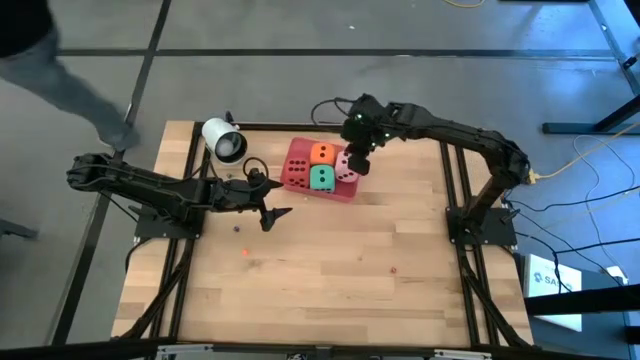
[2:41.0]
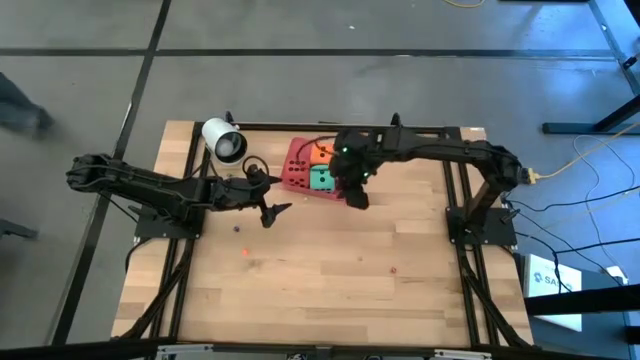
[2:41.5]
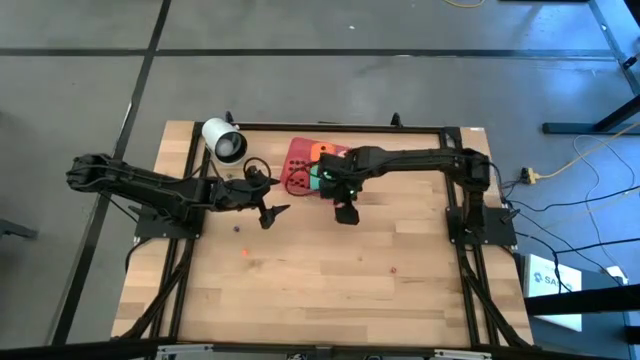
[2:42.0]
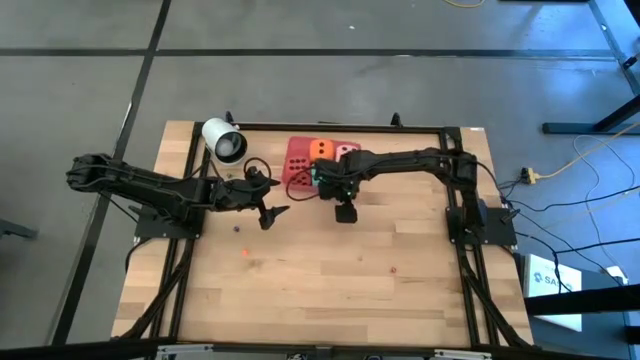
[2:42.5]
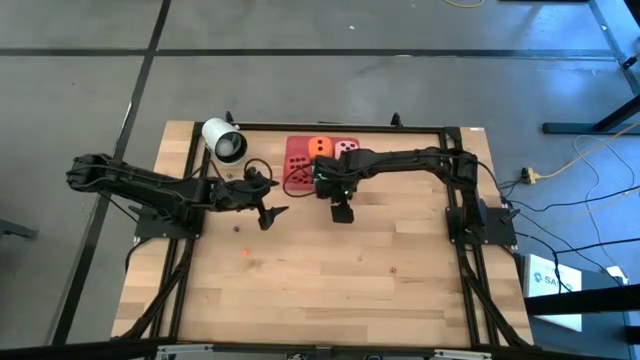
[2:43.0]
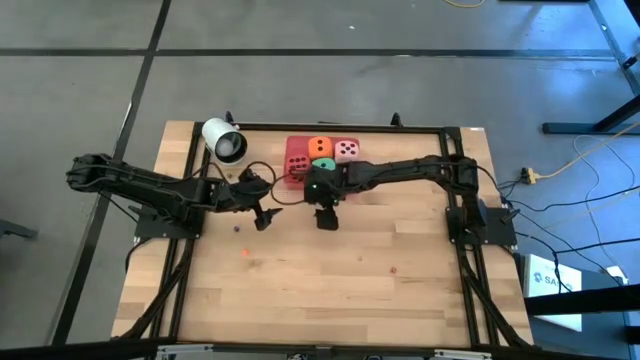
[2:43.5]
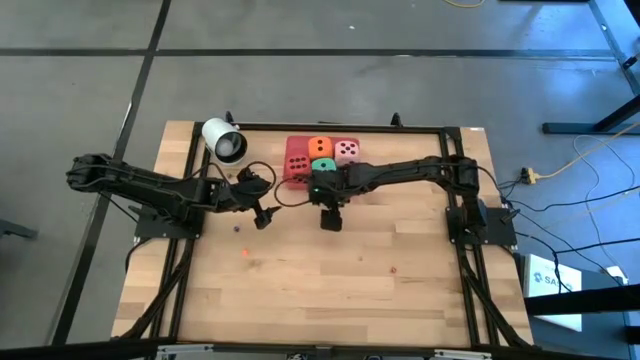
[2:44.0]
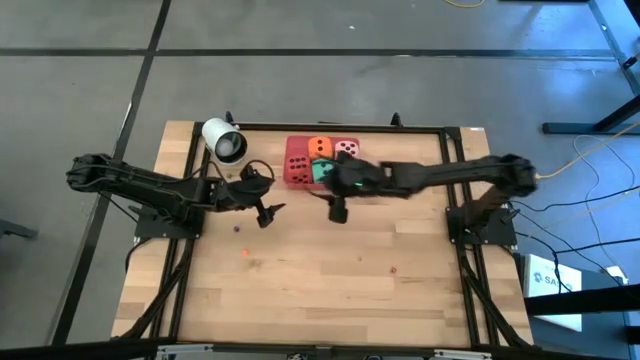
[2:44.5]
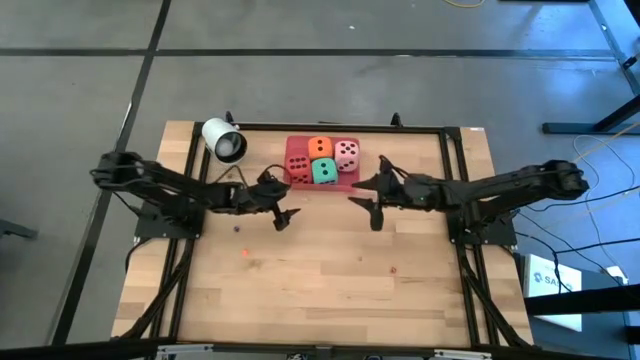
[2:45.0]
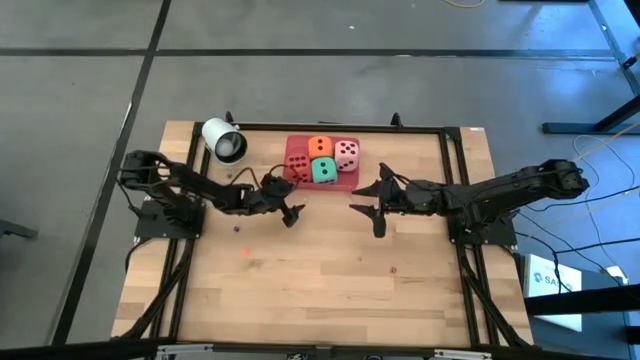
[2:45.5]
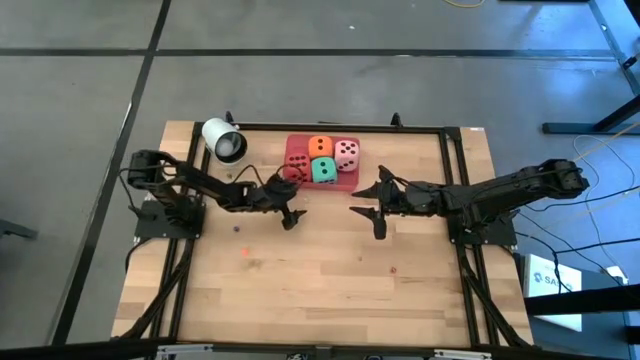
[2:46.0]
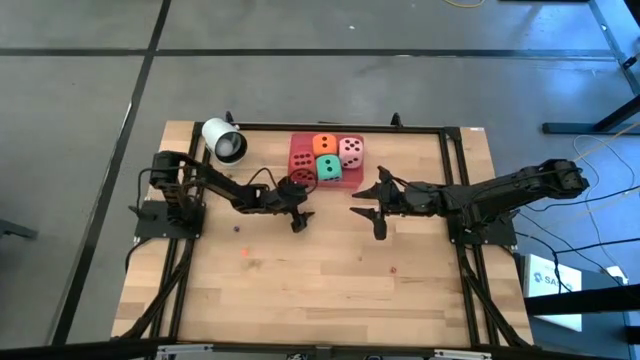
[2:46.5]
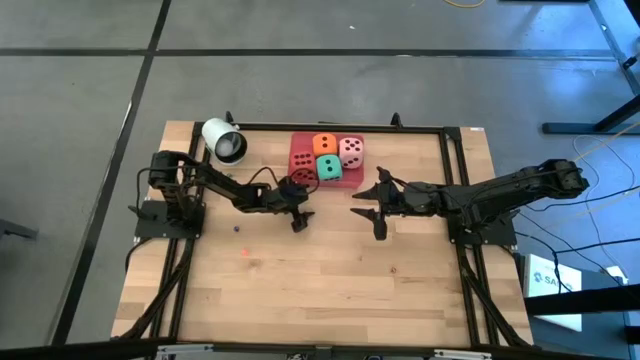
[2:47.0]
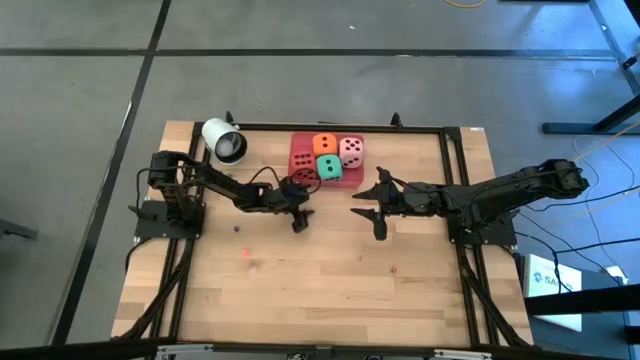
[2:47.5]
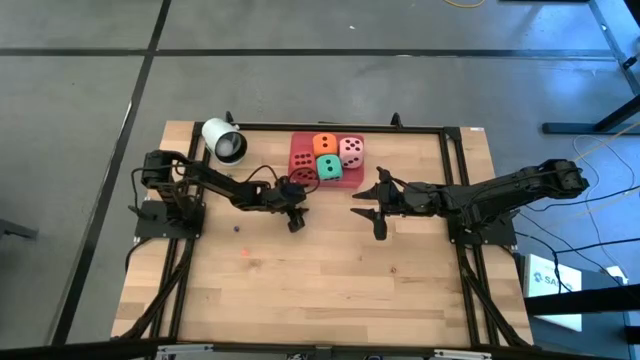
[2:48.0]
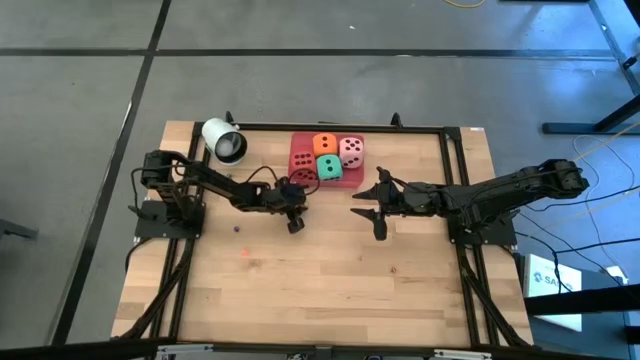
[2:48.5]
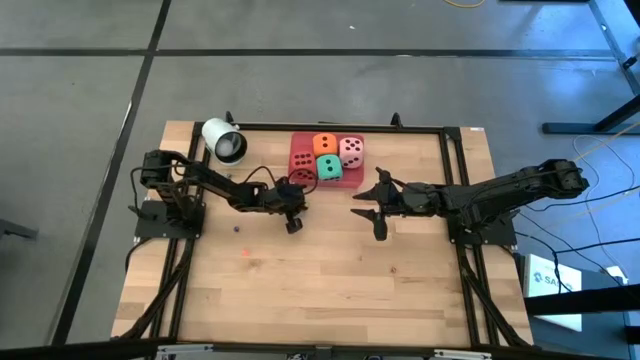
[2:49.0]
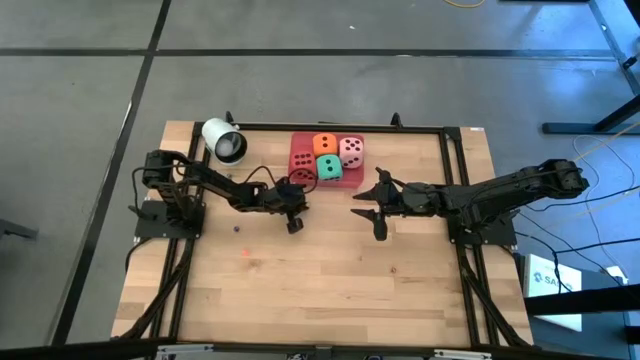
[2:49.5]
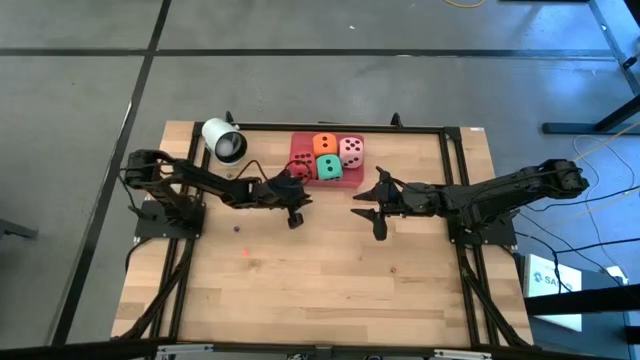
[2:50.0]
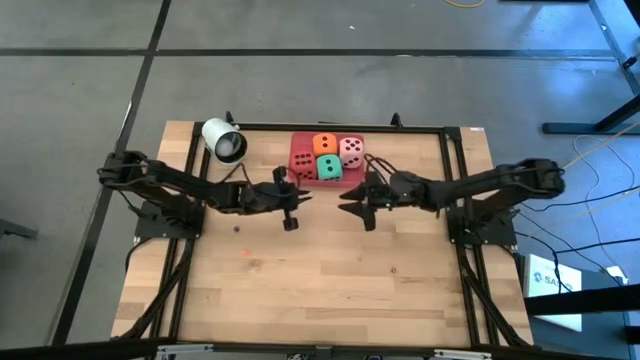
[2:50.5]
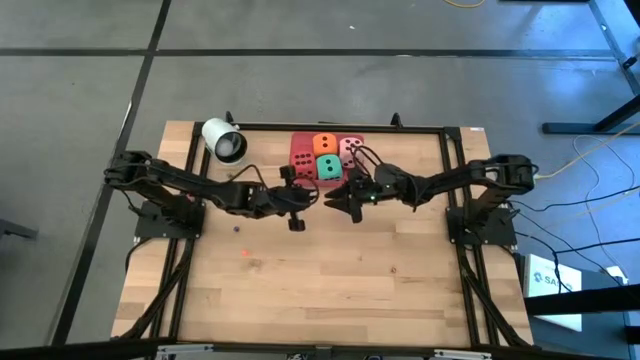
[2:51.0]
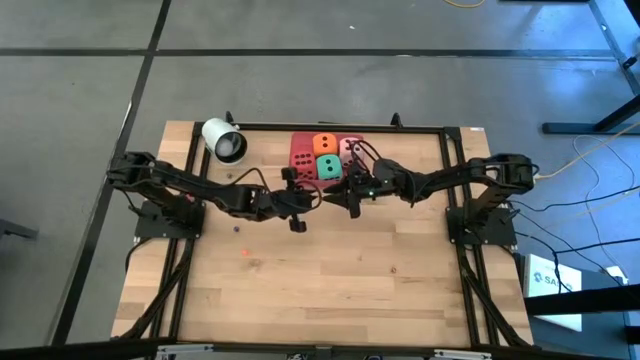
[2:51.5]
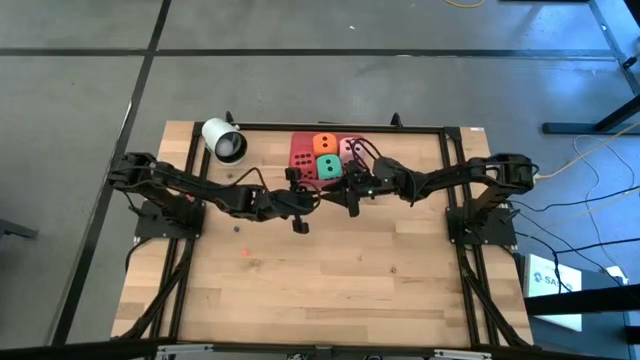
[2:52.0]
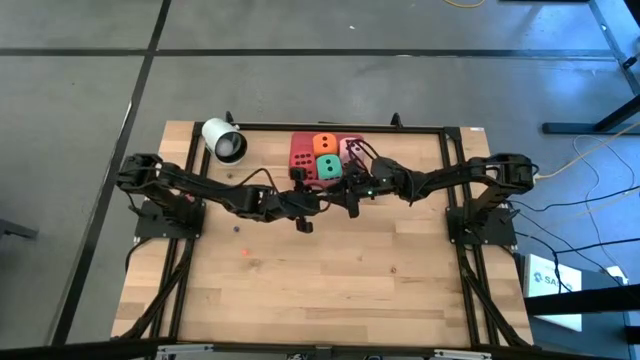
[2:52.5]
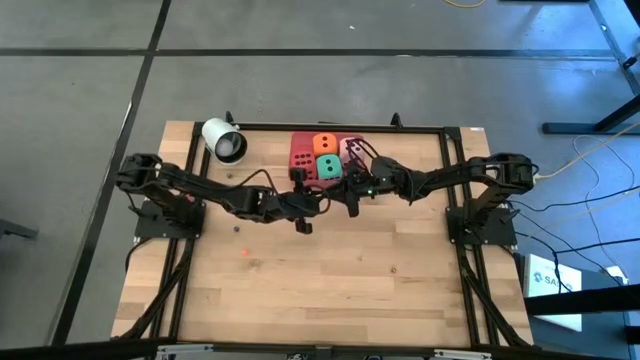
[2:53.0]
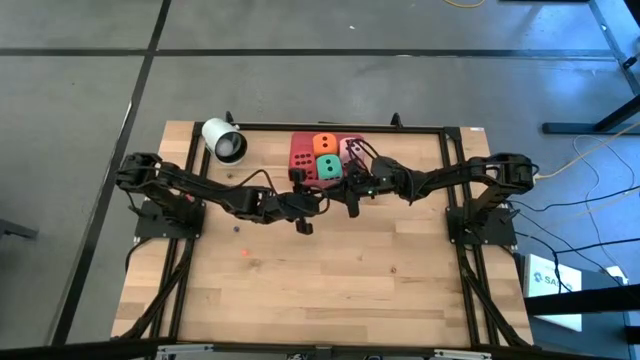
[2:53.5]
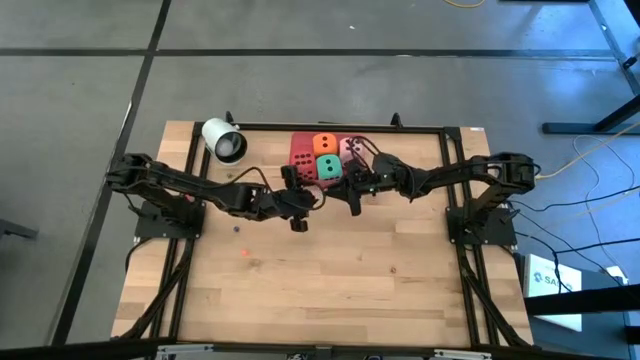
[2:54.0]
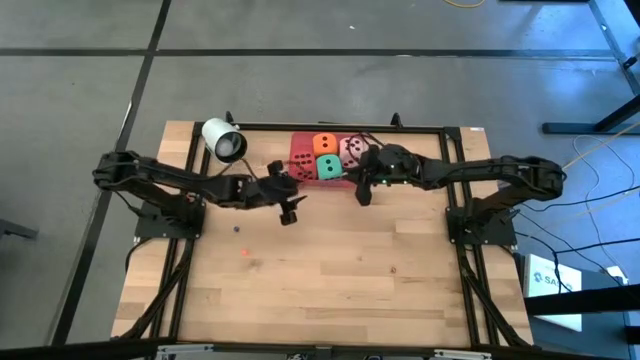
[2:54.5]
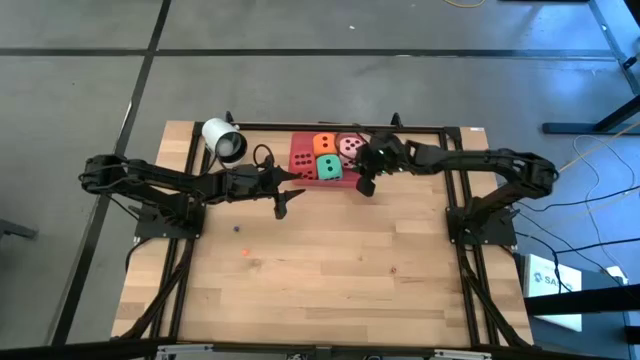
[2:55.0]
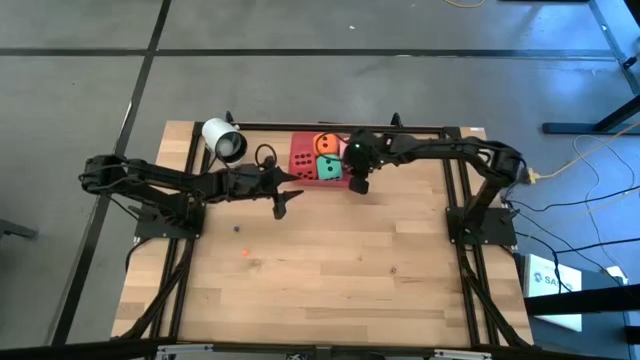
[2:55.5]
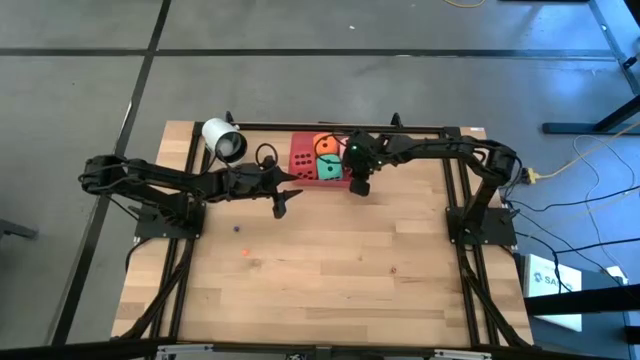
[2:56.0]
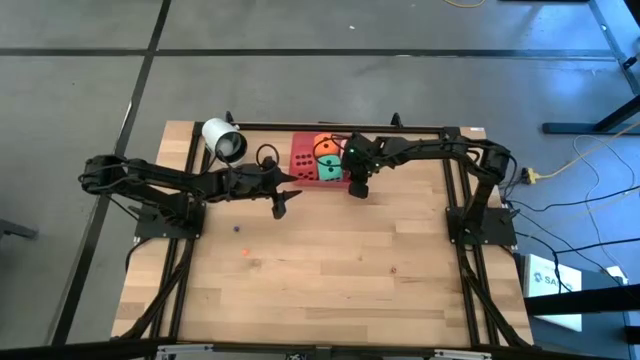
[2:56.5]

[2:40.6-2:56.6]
Task: Pick & Place Dice
Put the light green die into the pink bin

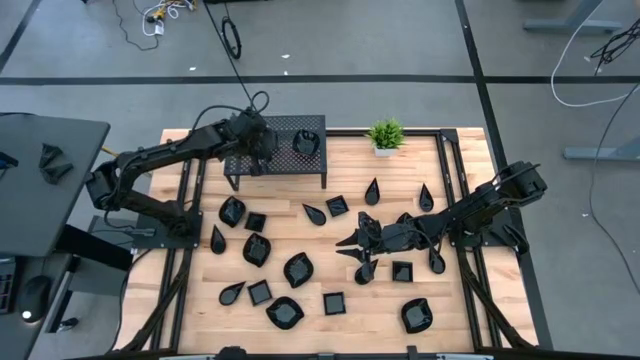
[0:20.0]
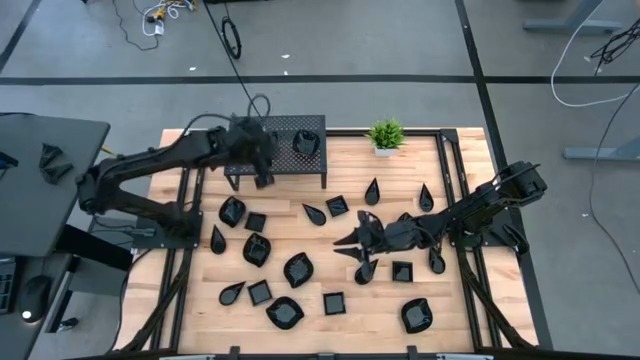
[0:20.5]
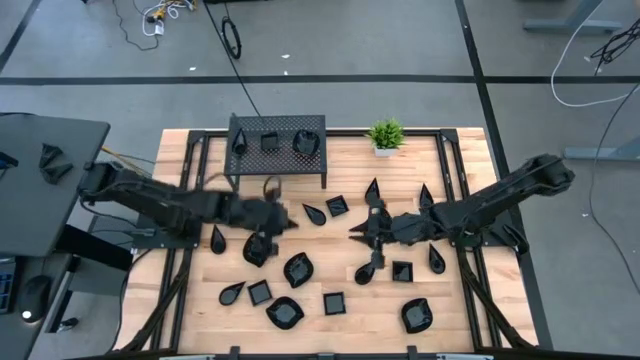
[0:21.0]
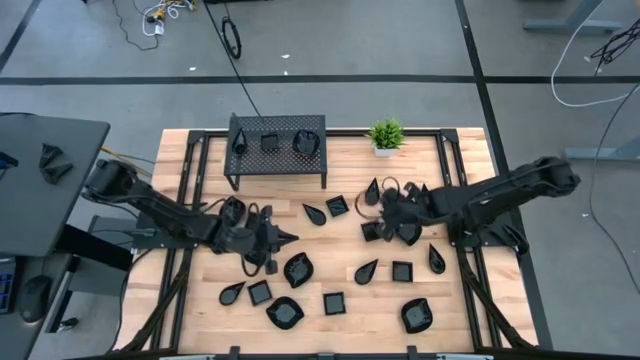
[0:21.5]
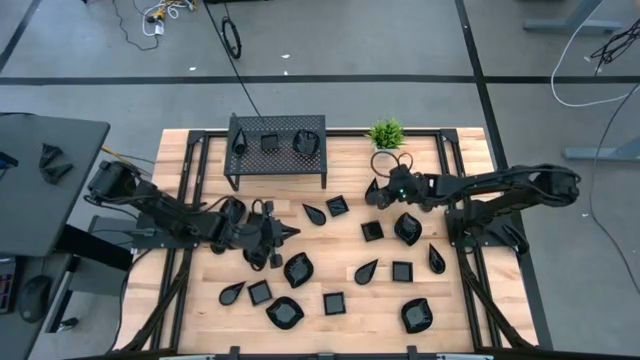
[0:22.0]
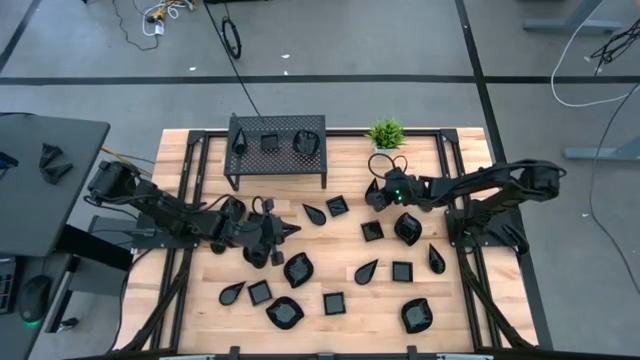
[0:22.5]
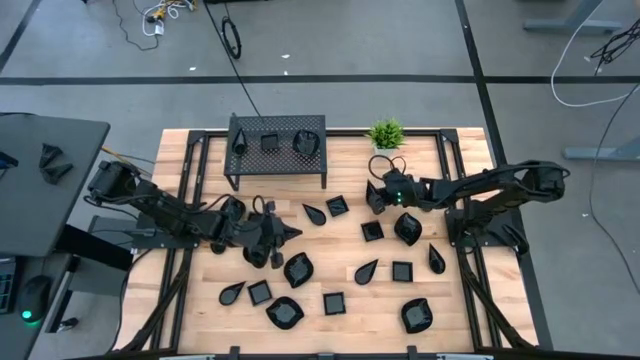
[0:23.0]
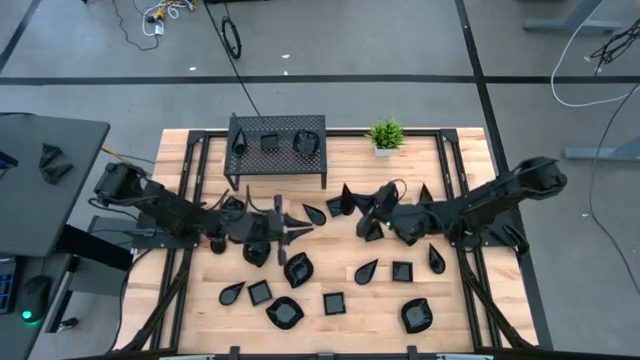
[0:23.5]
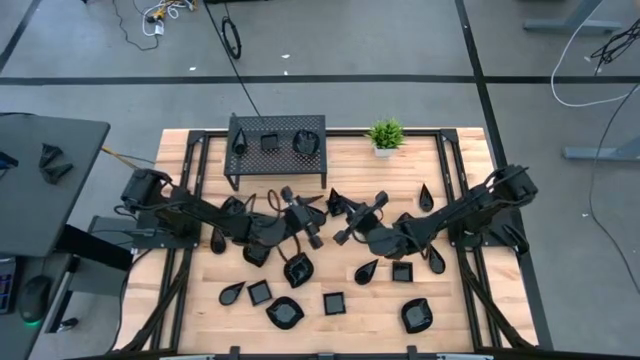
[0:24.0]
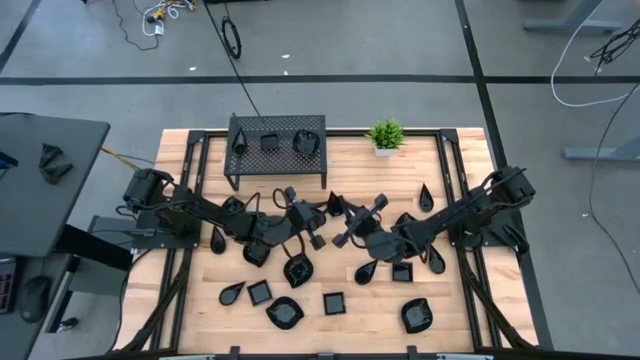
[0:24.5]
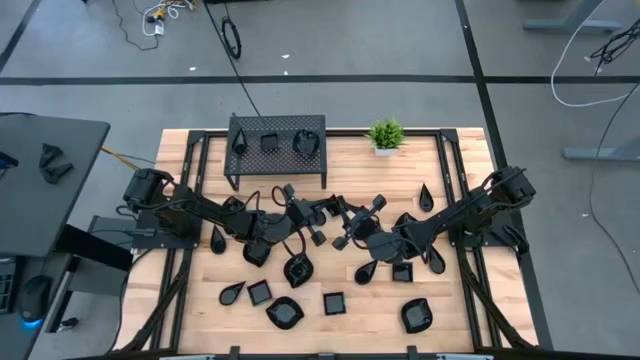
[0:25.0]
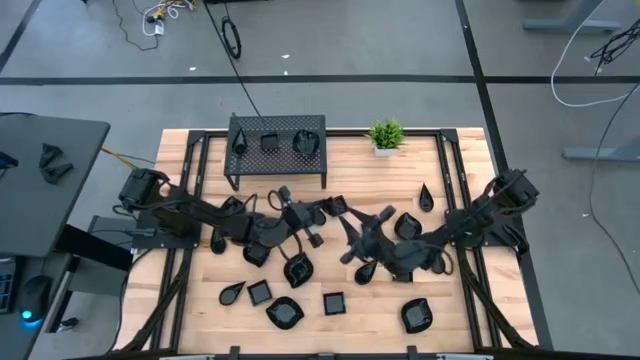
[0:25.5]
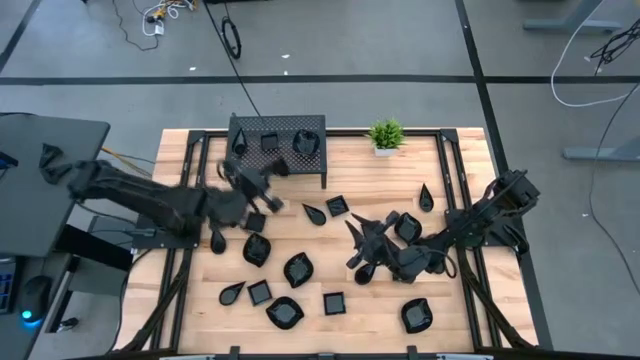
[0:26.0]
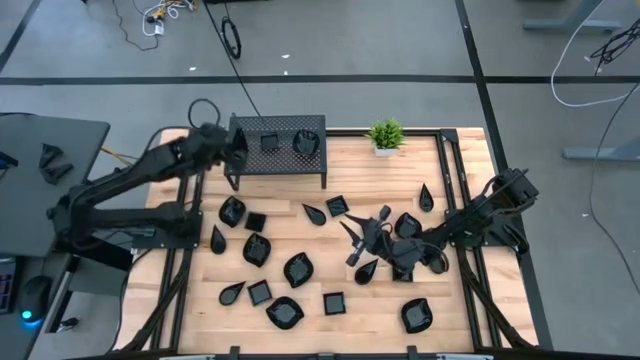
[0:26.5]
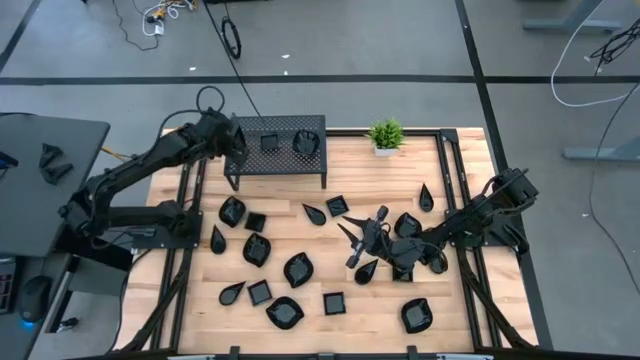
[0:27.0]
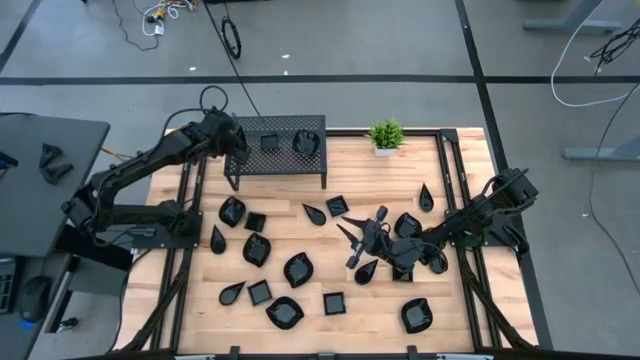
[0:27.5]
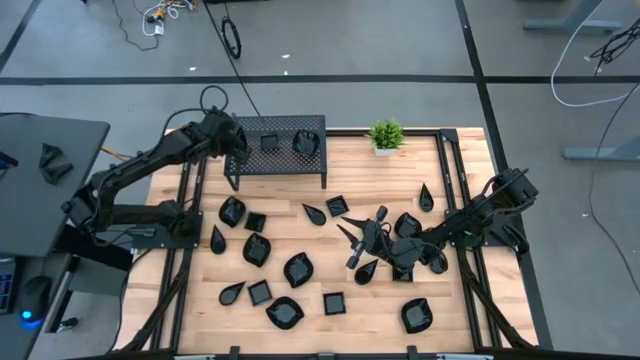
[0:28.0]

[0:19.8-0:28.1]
Task: Pick & Place Mini shaped plates
Stack the black drop shaped plate on top of the black drop shaped plate on the shelf
